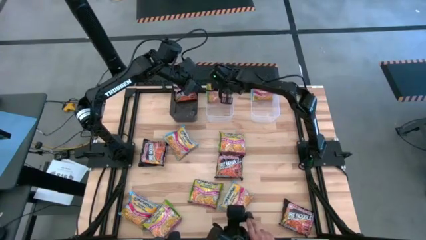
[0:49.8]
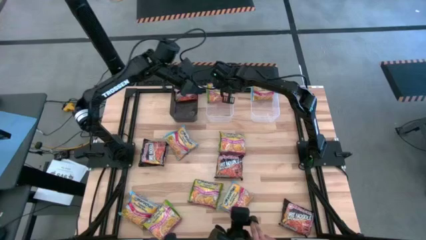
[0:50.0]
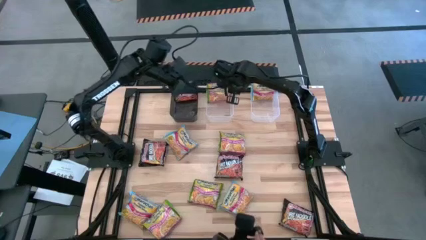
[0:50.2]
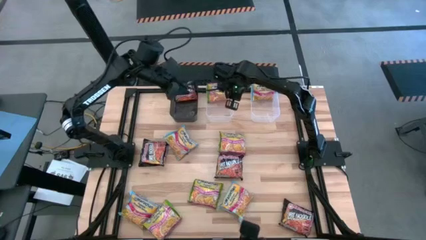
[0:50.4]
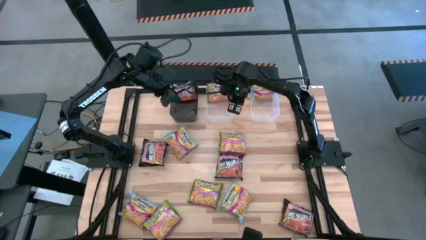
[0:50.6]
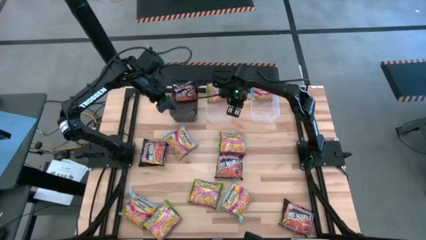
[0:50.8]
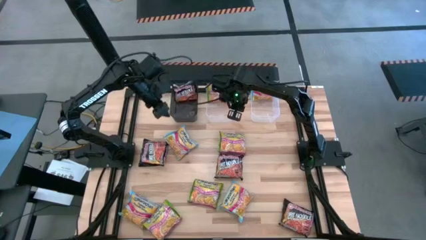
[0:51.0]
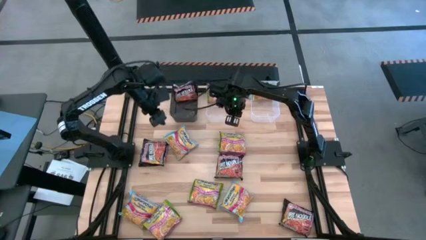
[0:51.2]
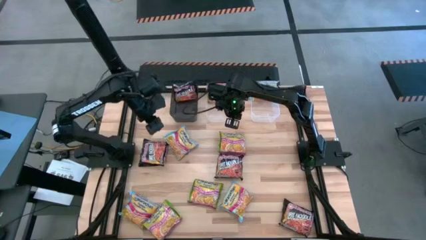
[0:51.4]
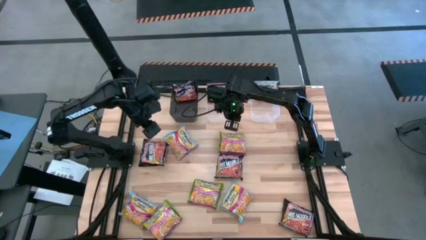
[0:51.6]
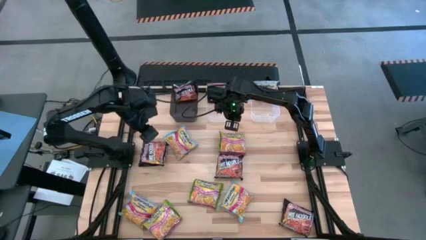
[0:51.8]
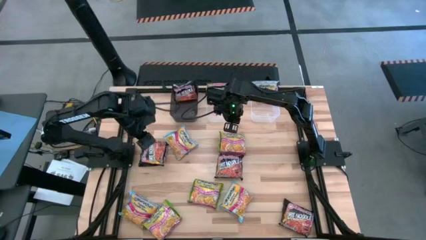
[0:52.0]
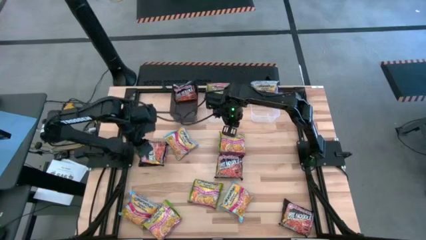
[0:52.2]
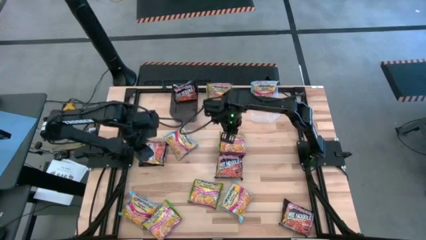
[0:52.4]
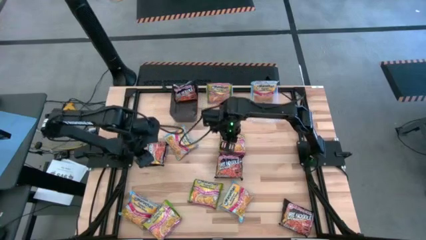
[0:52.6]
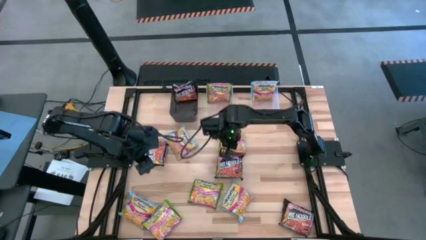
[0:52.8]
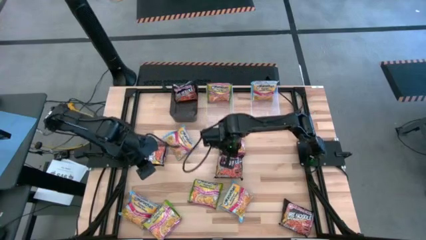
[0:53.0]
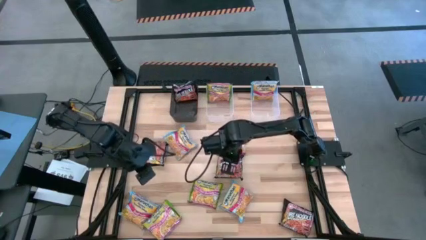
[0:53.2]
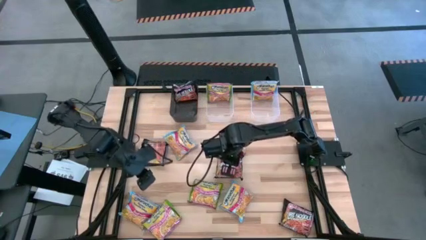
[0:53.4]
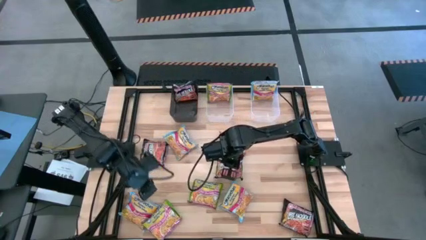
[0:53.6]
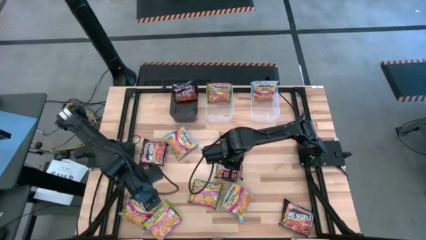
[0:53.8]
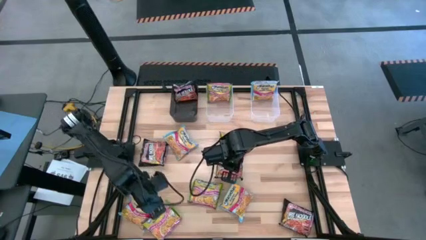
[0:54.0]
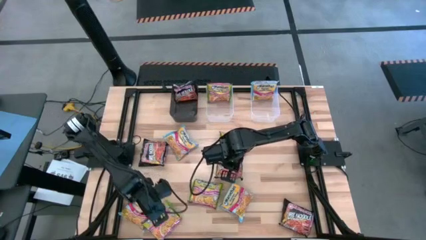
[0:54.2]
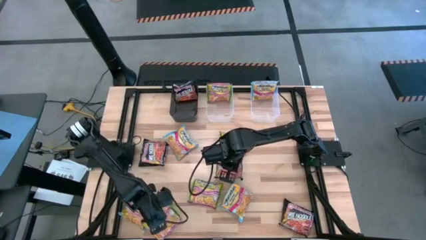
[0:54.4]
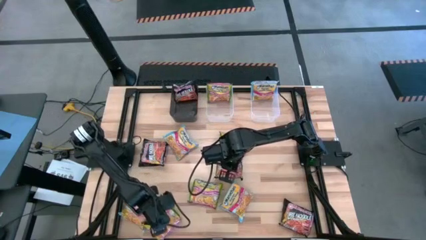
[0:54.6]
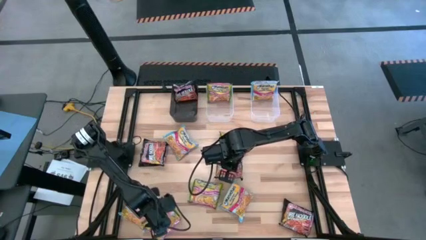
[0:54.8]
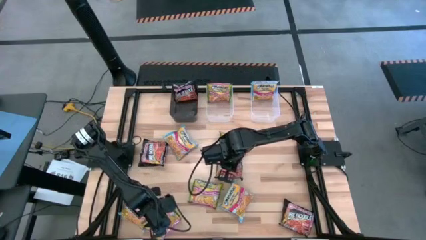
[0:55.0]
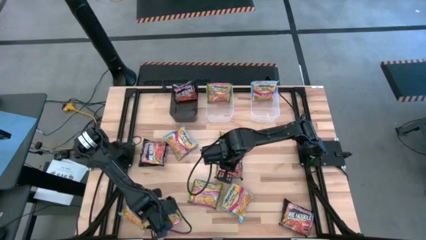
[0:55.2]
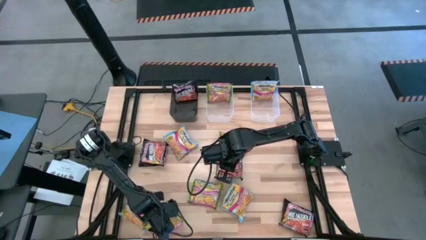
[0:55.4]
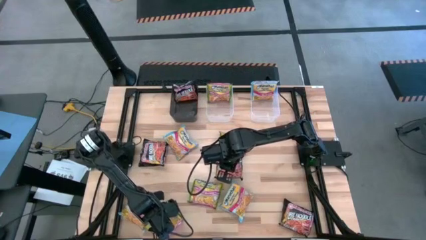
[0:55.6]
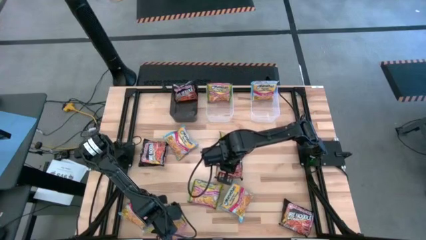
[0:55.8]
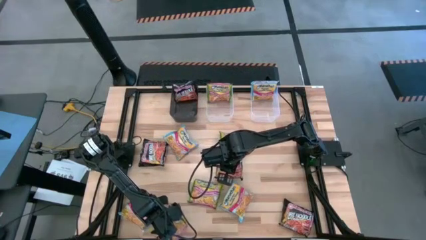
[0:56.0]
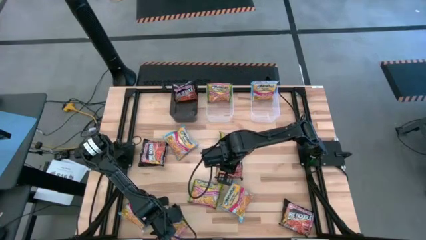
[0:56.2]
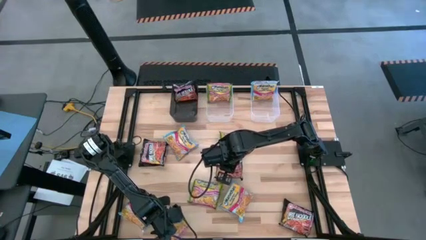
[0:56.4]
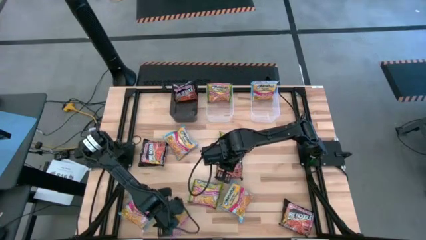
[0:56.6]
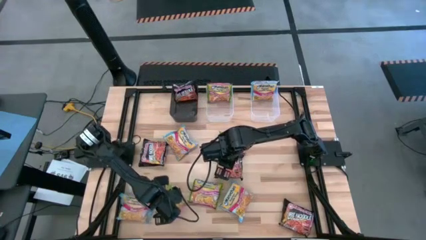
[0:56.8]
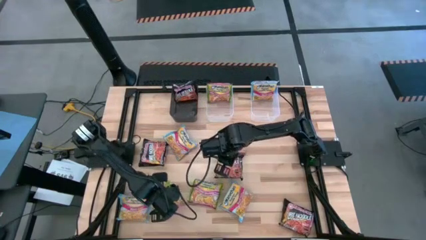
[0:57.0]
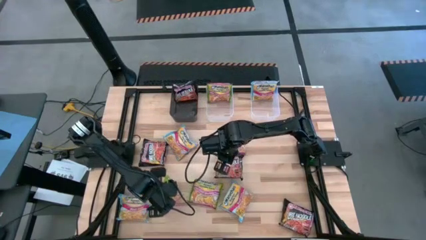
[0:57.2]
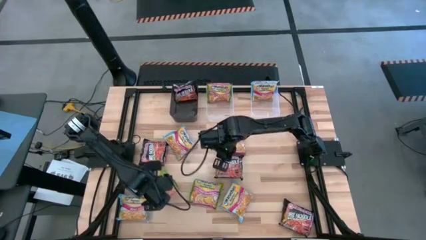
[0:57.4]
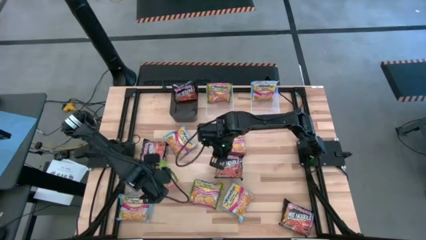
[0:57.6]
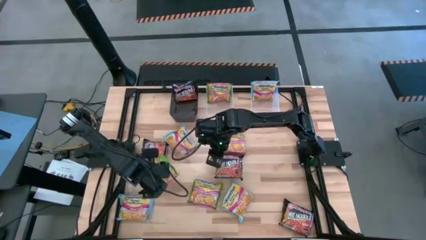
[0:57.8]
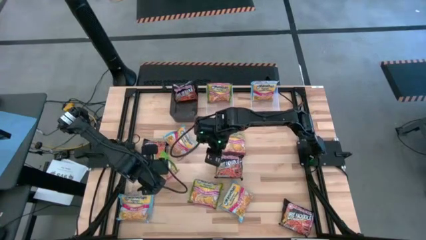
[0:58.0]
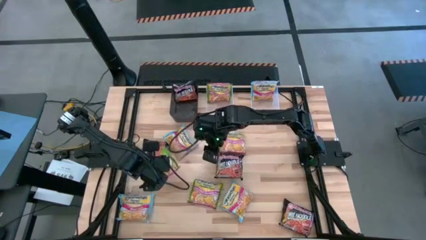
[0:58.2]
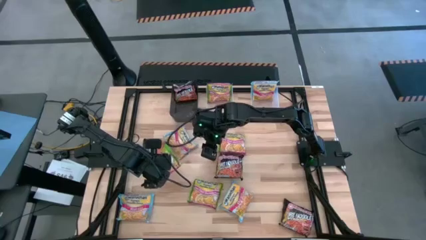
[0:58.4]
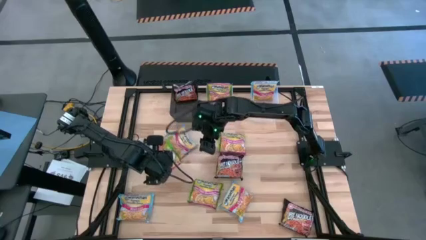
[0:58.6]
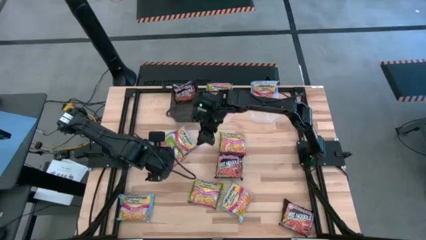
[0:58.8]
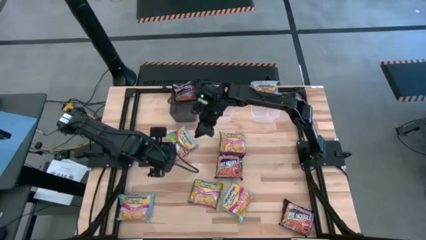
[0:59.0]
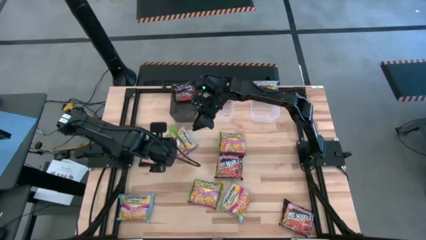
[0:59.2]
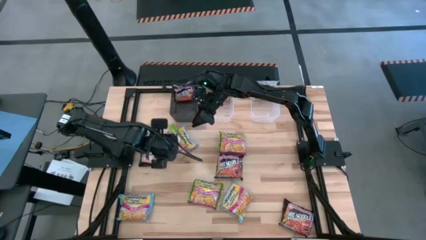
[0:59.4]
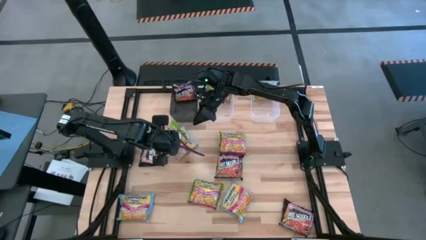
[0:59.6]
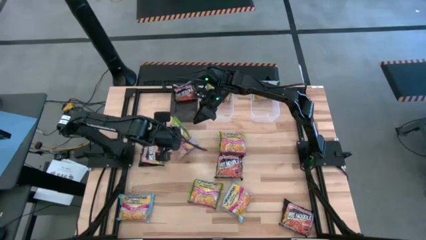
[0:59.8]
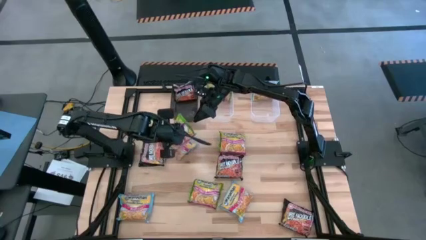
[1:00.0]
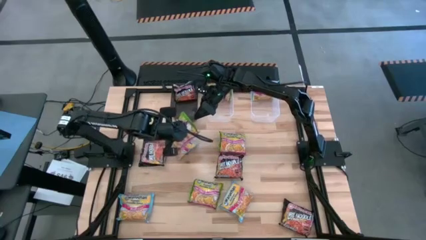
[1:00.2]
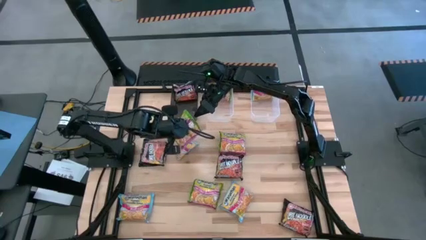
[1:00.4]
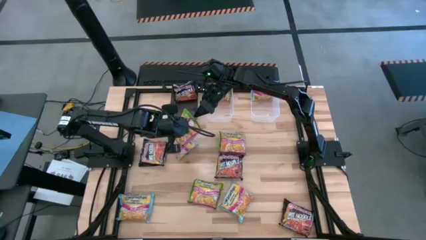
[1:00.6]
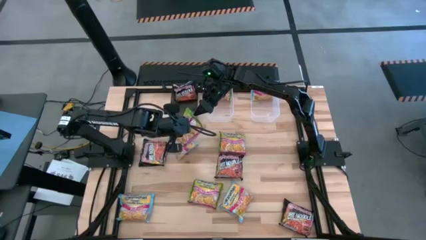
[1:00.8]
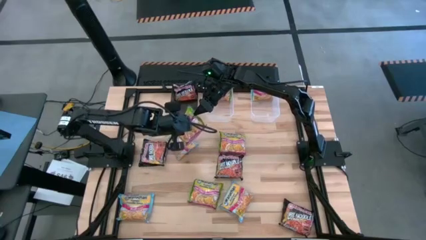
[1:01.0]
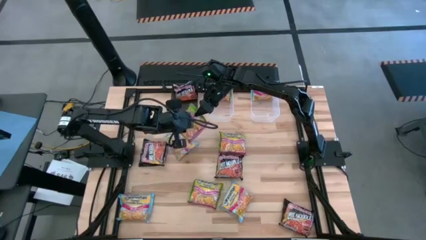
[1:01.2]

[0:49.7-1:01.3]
Task: Sort Maruchan noodles
Put the green noodle pack into the left transparent bin

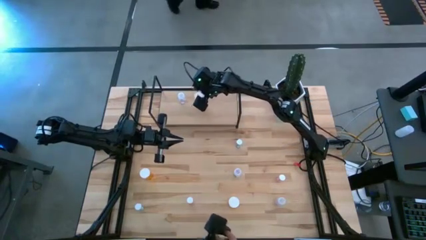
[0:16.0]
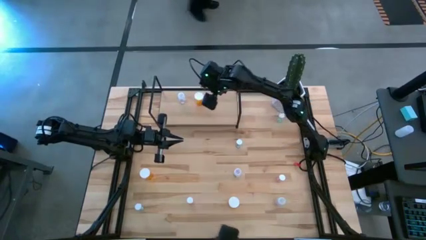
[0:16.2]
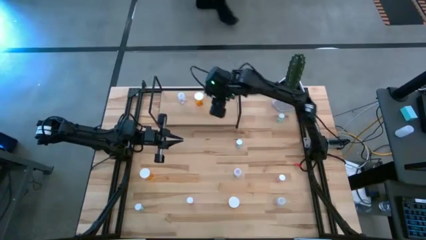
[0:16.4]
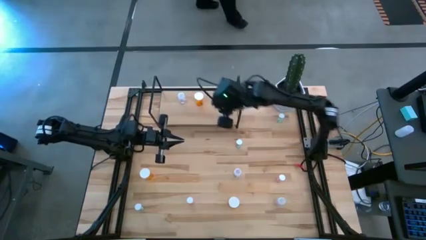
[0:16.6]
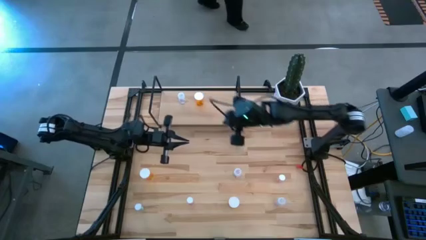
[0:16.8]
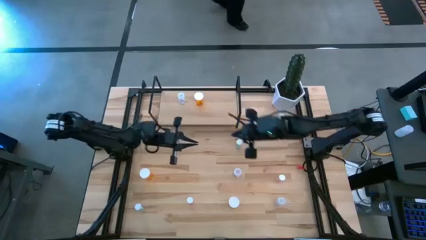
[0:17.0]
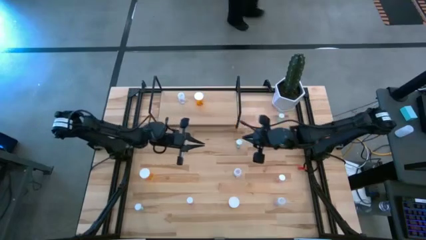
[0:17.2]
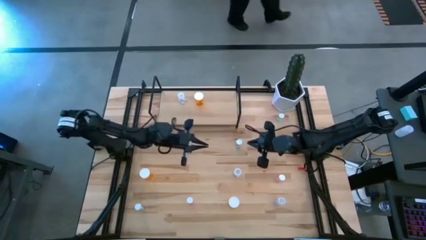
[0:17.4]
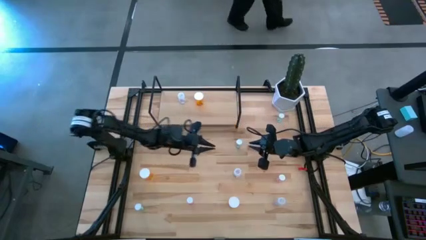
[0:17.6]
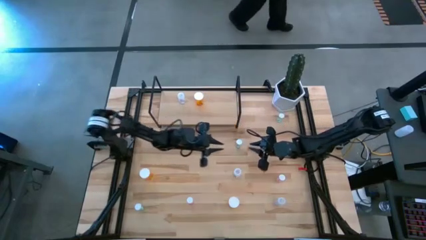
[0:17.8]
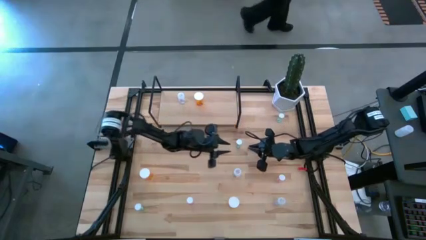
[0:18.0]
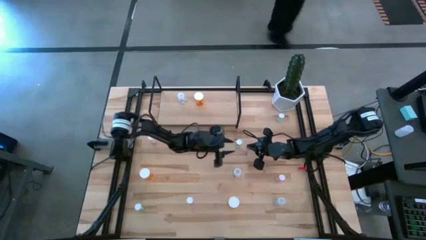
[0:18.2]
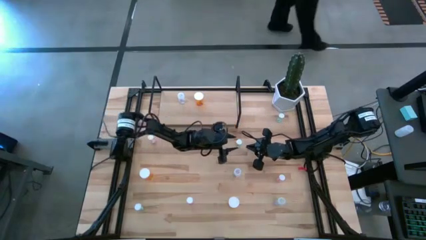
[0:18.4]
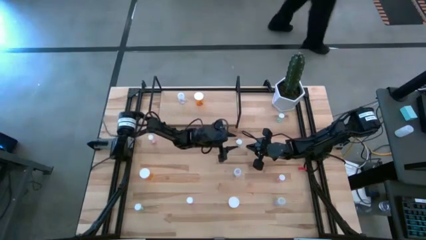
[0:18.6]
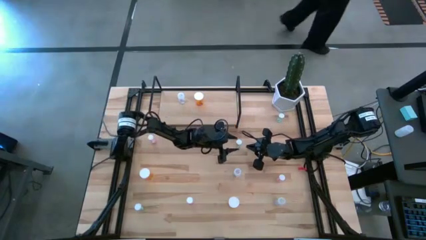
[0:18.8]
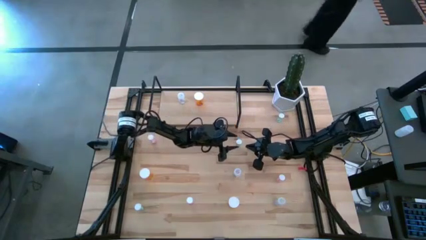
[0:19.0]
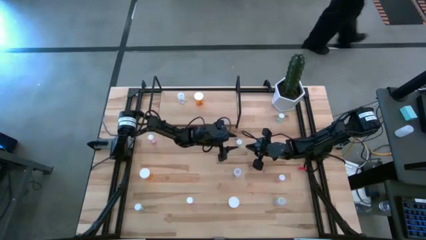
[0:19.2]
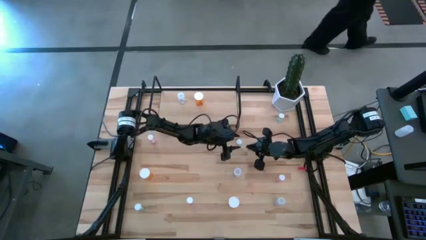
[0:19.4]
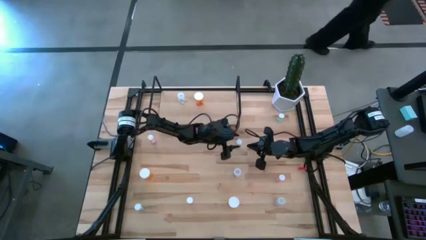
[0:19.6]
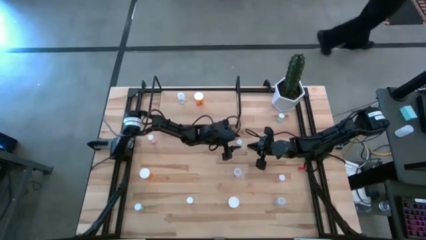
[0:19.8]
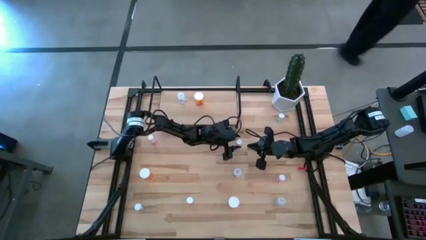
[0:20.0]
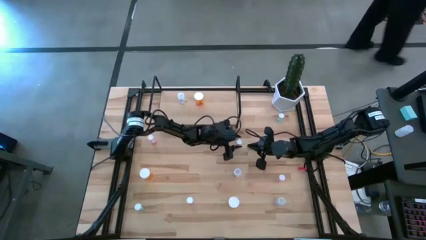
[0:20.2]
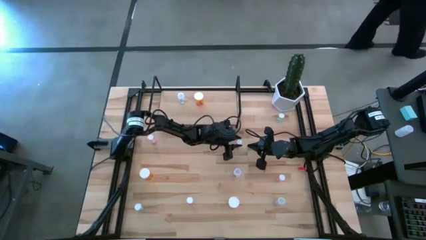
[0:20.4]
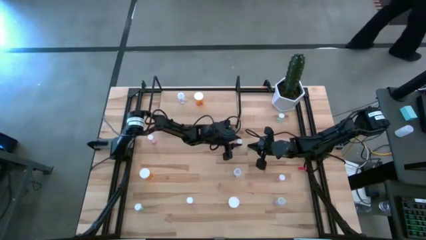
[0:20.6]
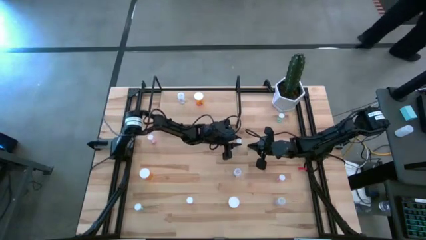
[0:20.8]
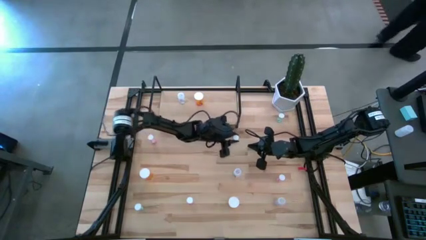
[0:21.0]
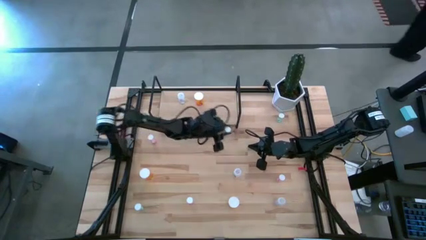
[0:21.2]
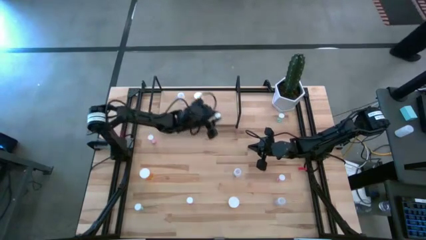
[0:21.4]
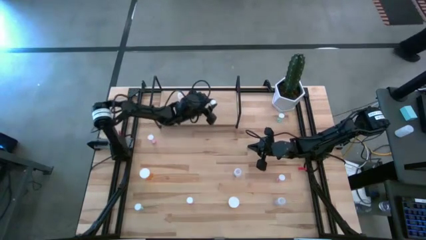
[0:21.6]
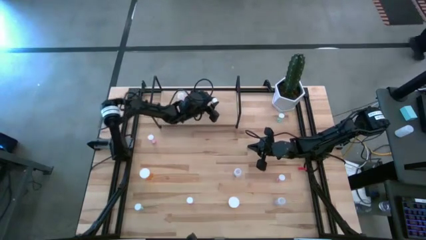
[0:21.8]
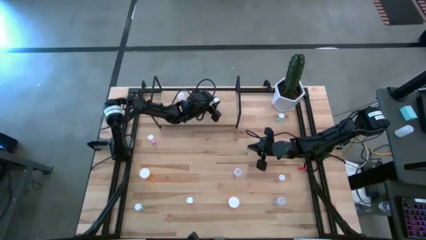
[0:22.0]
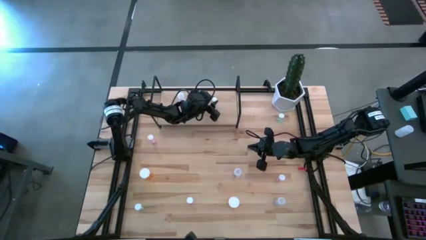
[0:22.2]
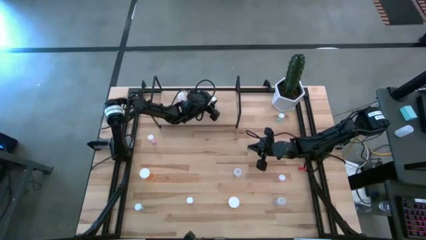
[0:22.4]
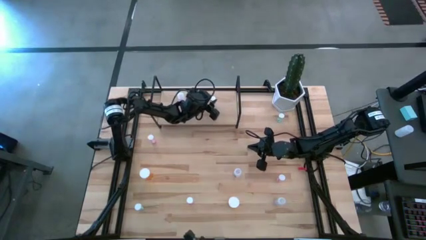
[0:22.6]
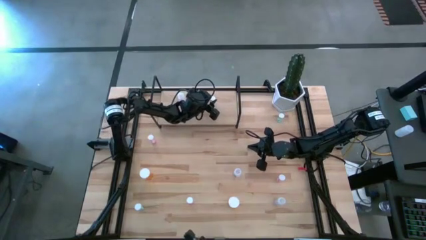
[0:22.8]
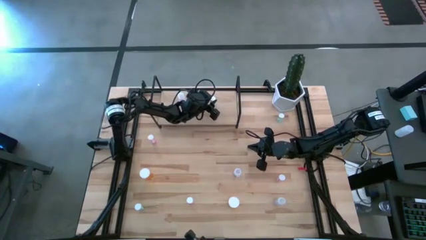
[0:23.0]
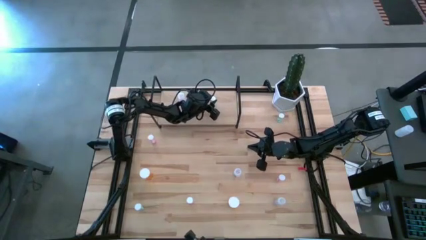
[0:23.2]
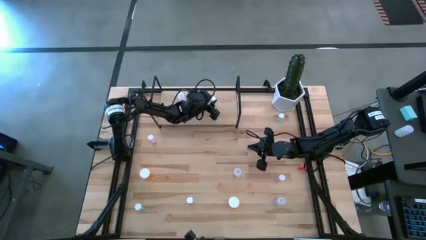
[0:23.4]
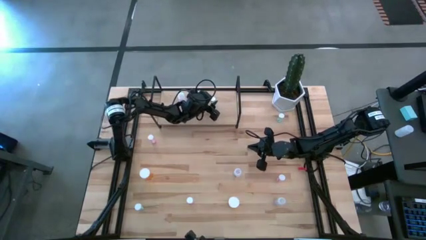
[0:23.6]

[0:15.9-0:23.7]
Task: Pick and place medicine bottles onto shelf by color
Put the middle green pill bottle on the shelf
